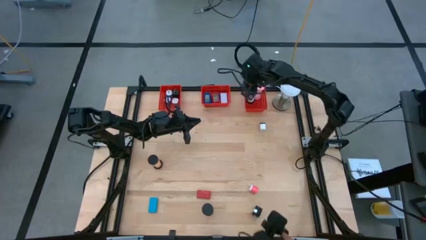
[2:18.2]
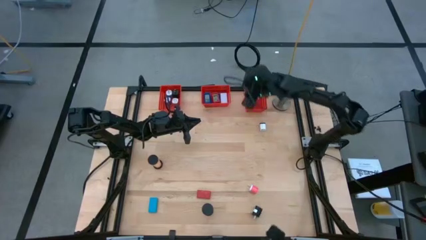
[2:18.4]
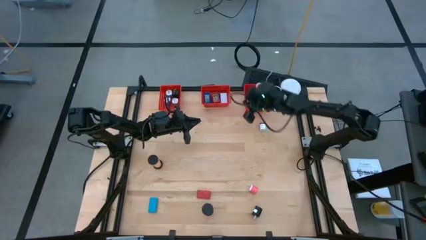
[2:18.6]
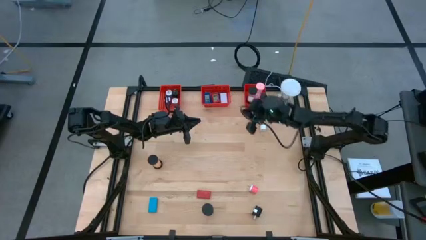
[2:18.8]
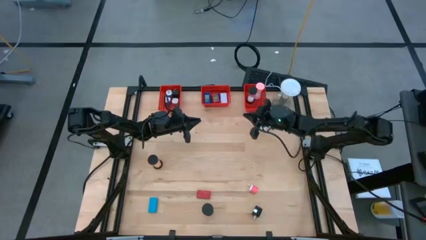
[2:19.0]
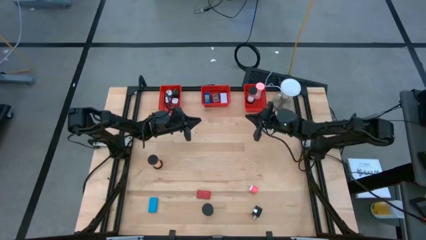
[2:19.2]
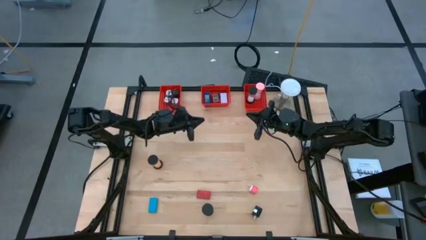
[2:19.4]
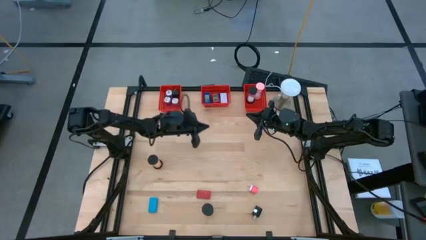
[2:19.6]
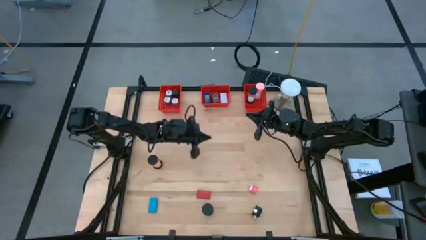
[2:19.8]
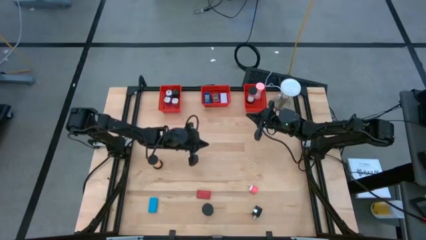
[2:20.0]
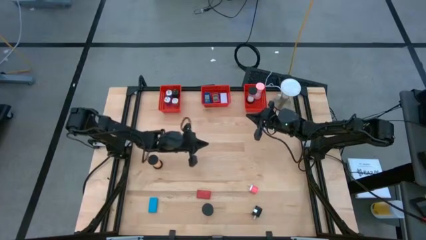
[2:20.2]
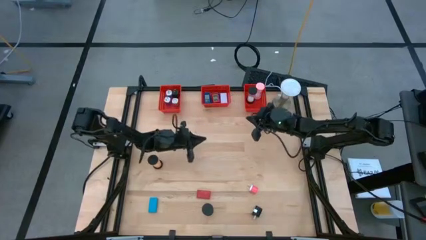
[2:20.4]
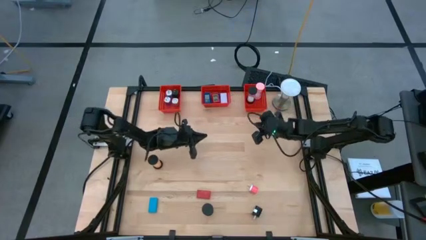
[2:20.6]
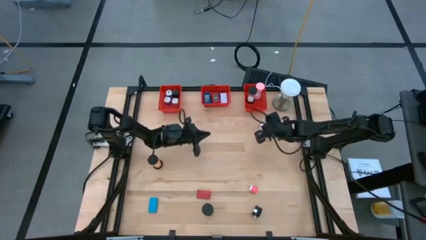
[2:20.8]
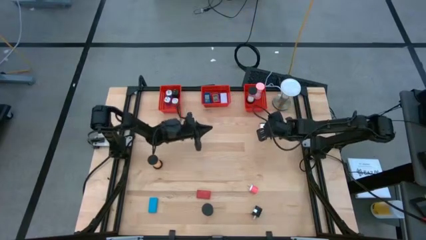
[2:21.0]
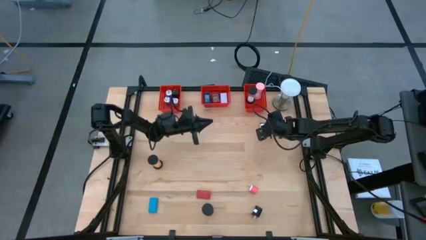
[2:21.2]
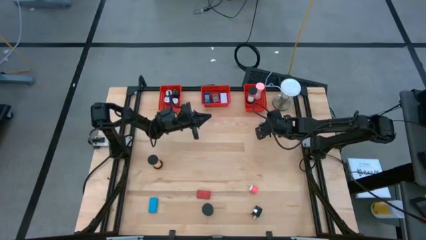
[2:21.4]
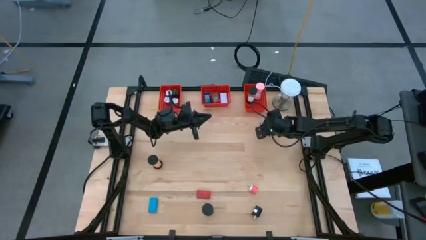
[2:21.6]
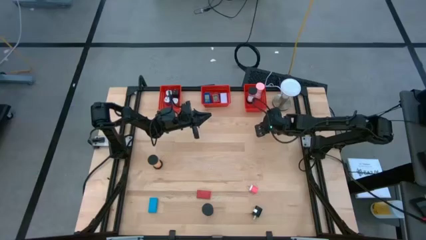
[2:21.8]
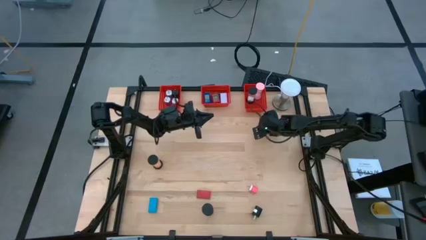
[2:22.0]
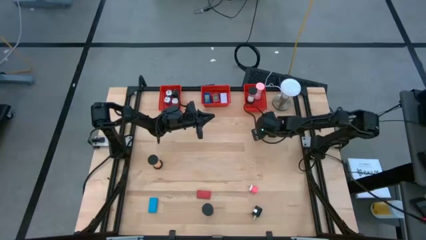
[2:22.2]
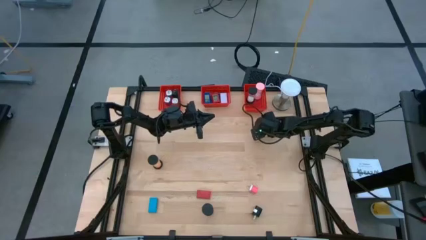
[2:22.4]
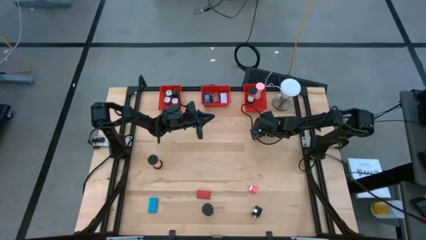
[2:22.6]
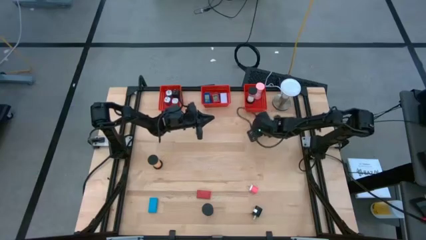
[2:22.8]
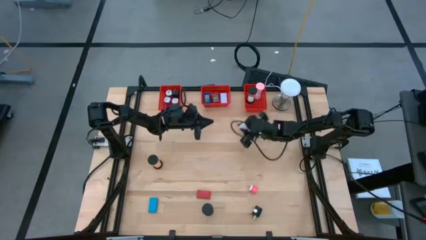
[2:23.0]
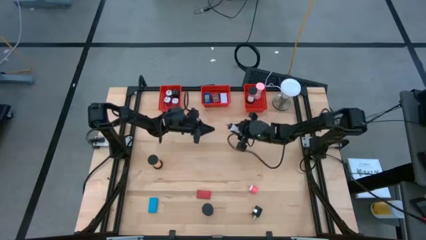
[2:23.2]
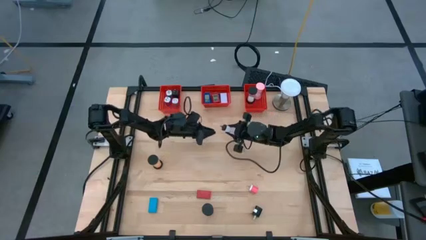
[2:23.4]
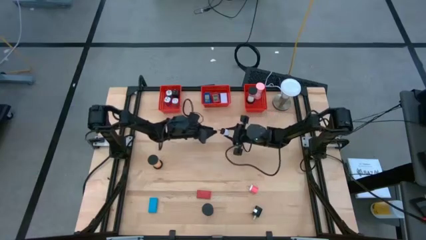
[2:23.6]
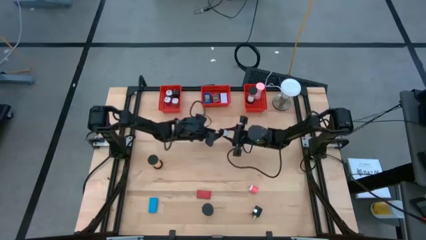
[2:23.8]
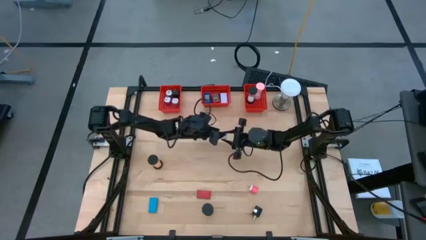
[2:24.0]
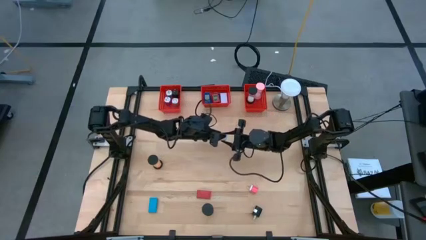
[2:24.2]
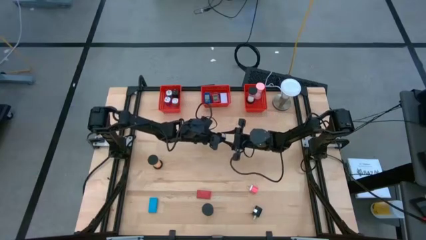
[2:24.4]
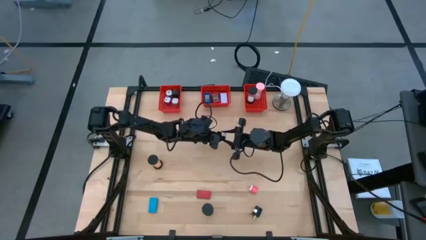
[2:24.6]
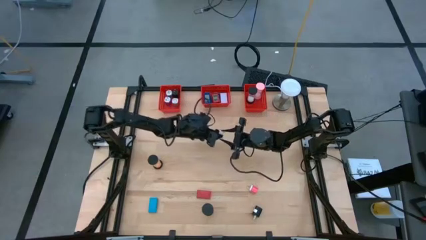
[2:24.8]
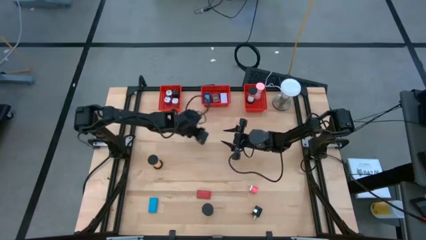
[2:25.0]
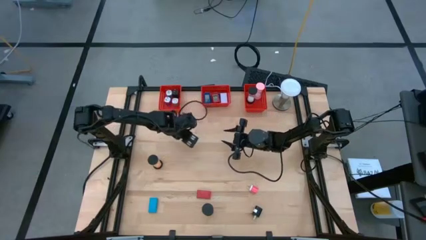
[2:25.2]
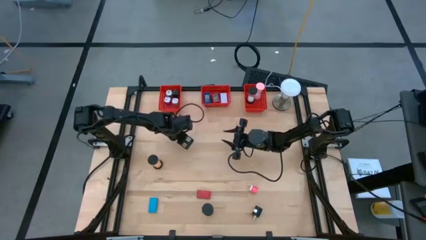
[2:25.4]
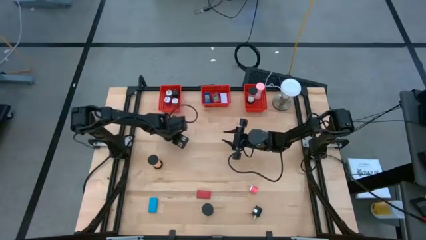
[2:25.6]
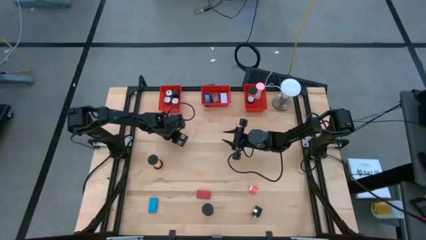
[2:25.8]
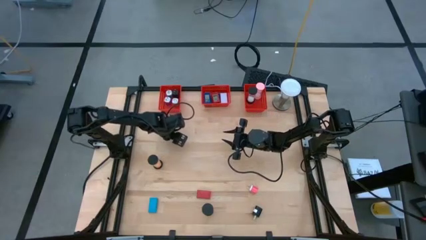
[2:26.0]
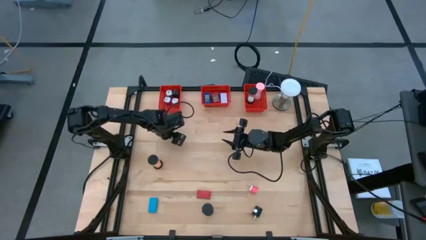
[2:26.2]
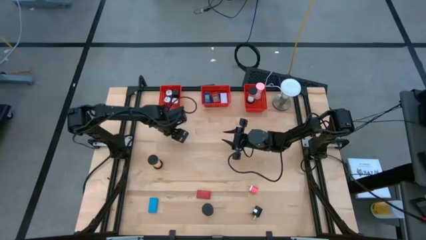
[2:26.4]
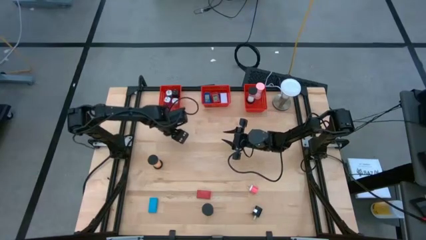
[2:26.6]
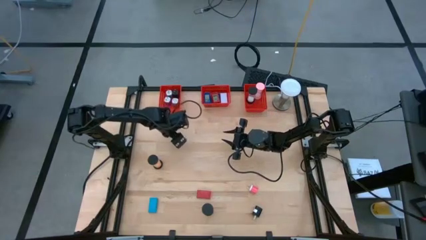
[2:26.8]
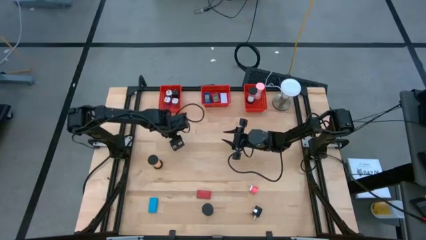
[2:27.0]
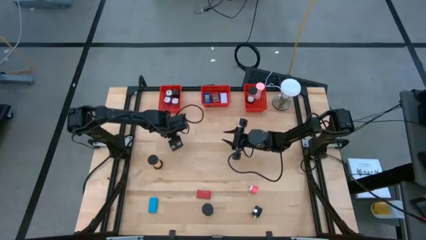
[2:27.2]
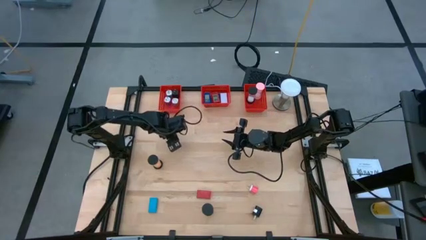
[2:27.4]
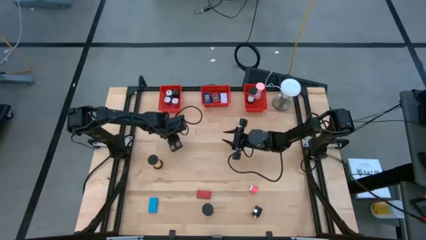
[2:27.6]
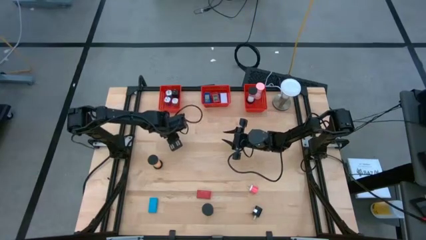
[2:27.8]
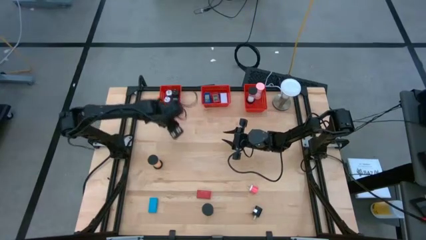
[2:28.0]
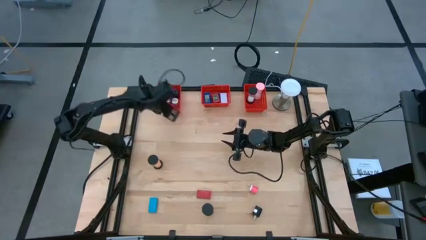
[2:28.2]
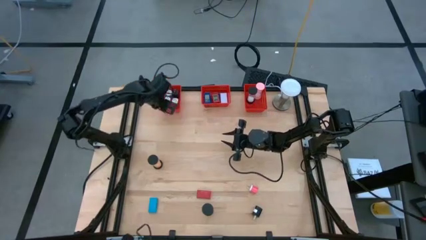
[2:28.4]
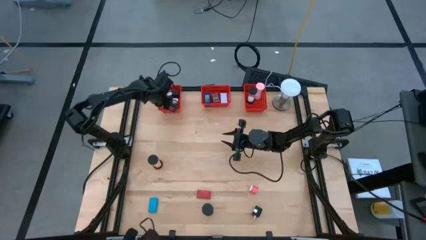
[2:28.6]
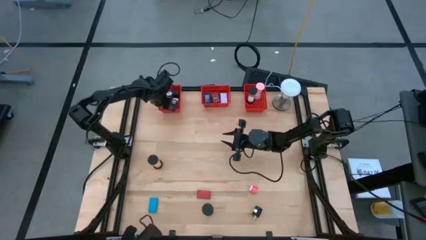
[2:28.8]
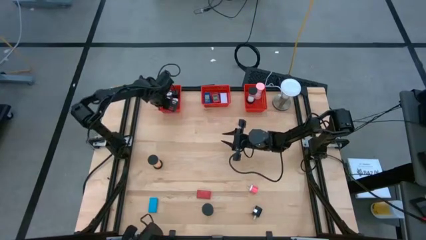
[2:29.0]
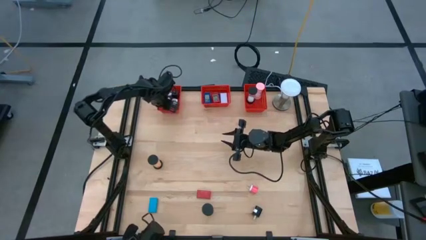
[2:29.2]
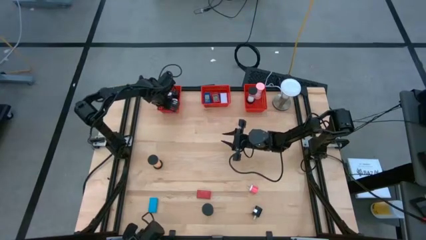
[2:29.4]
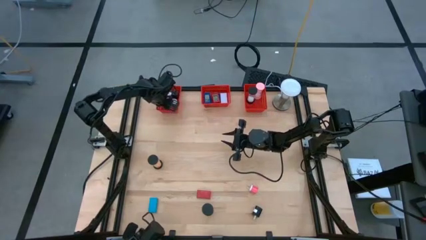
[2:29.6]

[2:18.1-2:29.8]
Task: Pick & Place Office items
Put the white charger adapter into the left red bin
